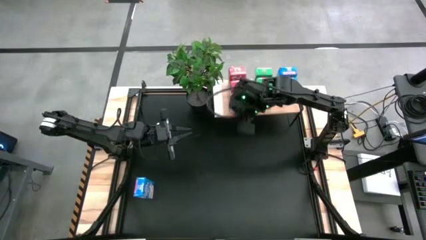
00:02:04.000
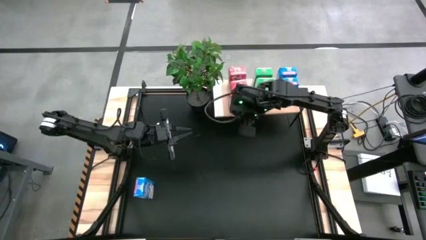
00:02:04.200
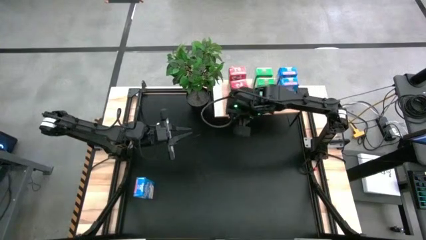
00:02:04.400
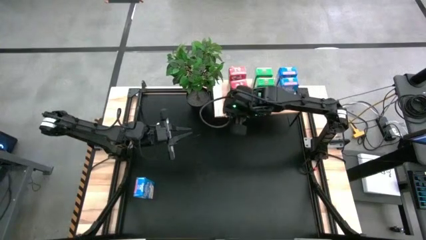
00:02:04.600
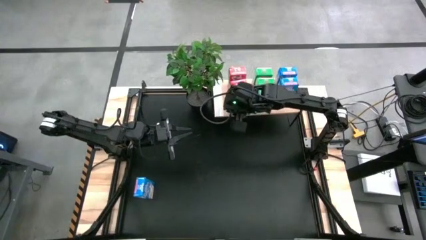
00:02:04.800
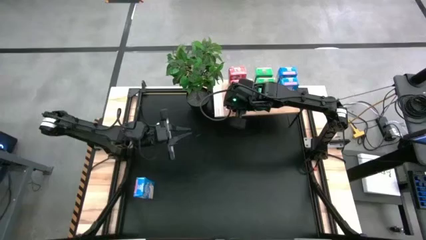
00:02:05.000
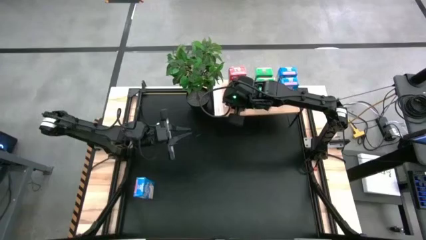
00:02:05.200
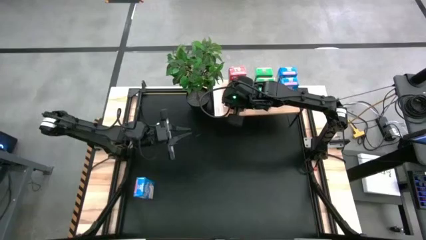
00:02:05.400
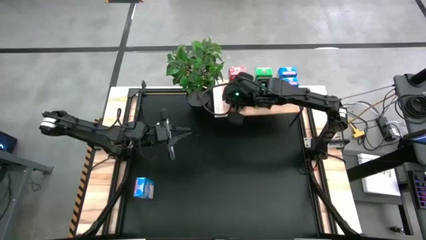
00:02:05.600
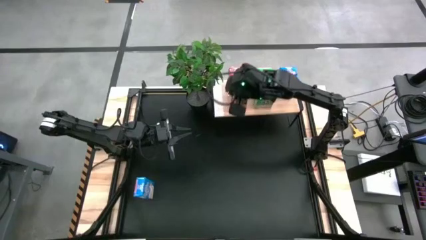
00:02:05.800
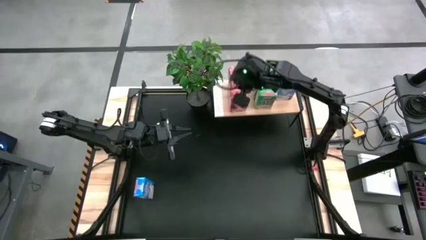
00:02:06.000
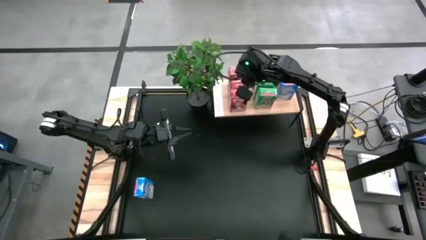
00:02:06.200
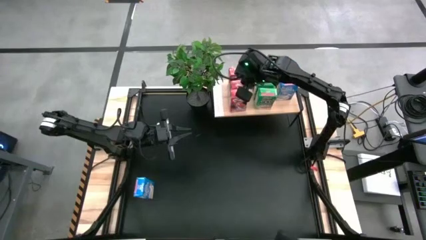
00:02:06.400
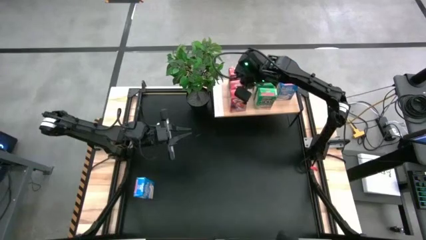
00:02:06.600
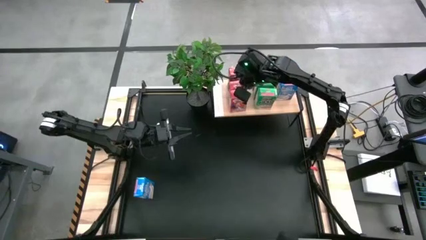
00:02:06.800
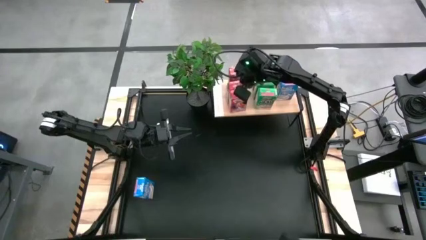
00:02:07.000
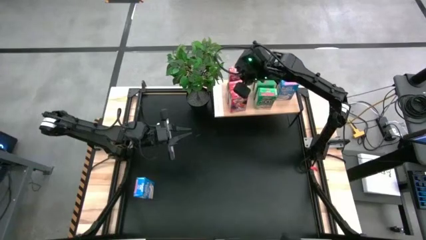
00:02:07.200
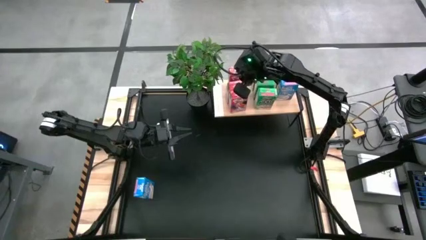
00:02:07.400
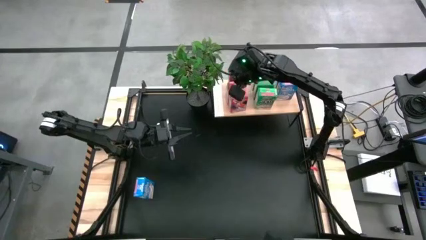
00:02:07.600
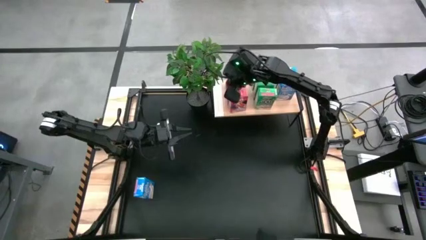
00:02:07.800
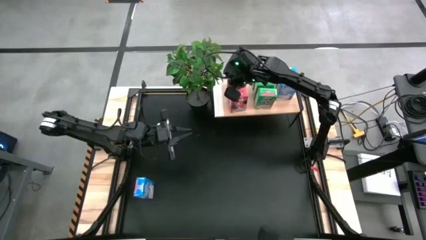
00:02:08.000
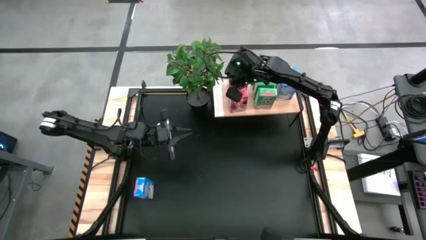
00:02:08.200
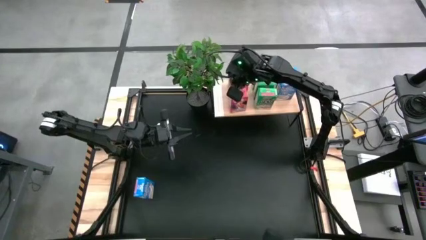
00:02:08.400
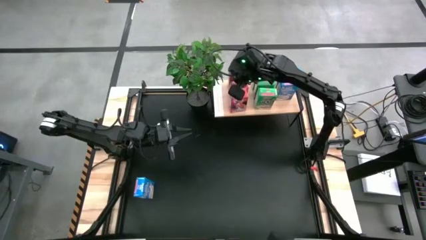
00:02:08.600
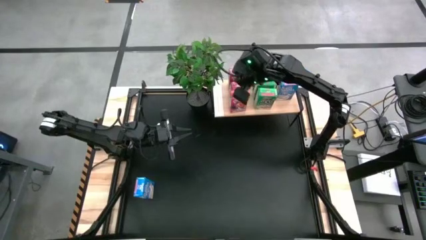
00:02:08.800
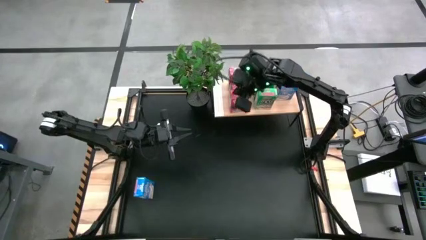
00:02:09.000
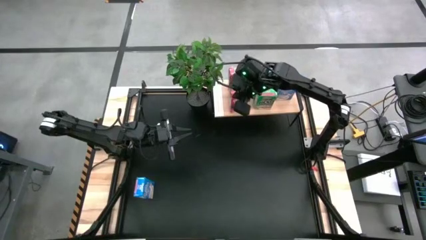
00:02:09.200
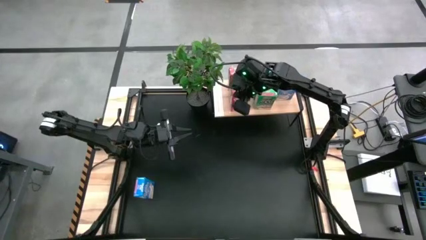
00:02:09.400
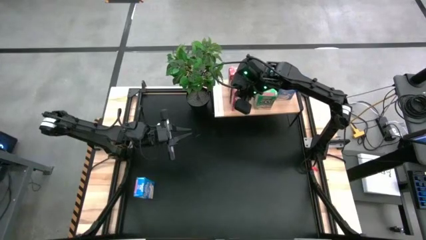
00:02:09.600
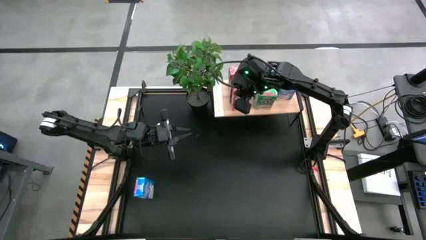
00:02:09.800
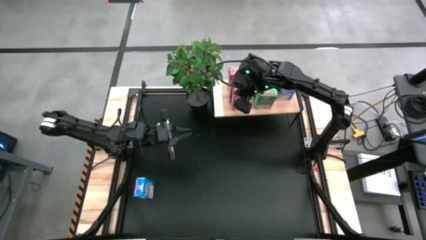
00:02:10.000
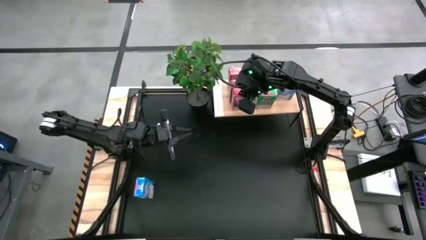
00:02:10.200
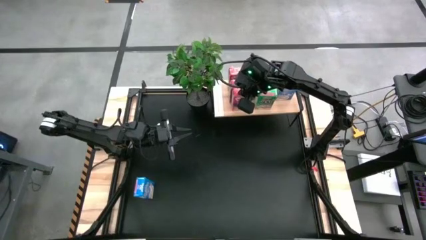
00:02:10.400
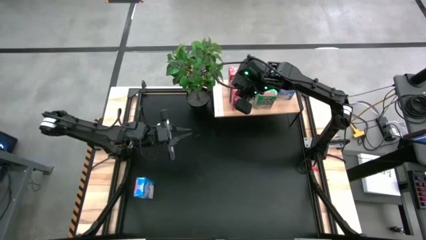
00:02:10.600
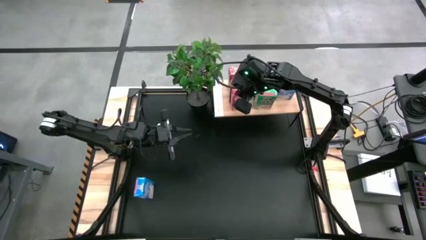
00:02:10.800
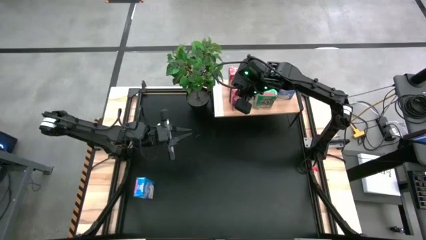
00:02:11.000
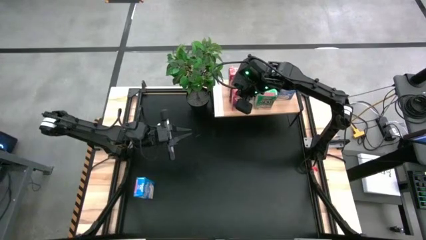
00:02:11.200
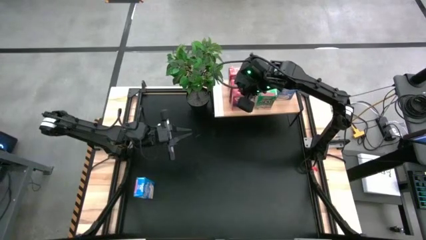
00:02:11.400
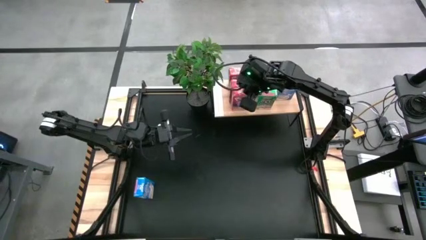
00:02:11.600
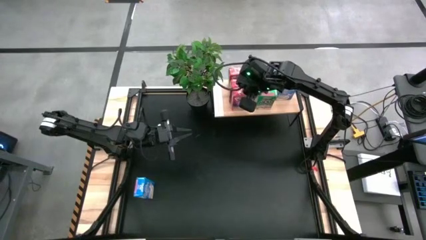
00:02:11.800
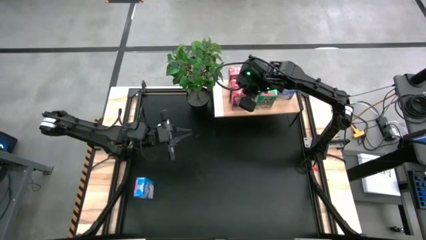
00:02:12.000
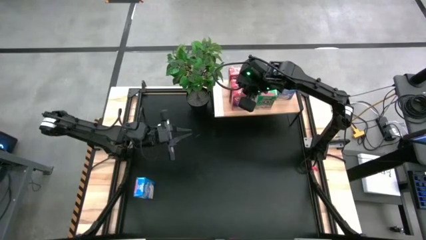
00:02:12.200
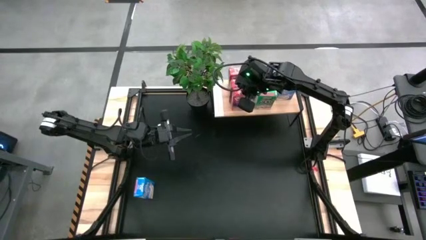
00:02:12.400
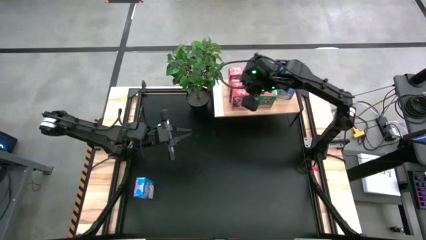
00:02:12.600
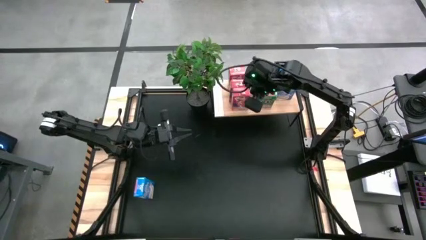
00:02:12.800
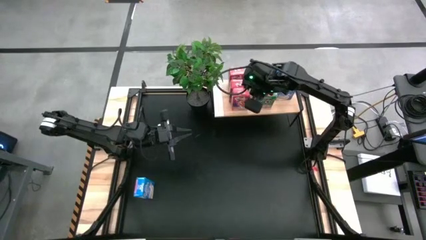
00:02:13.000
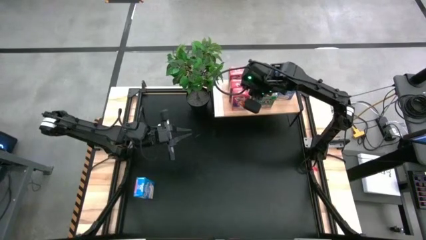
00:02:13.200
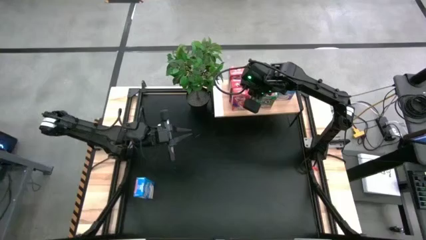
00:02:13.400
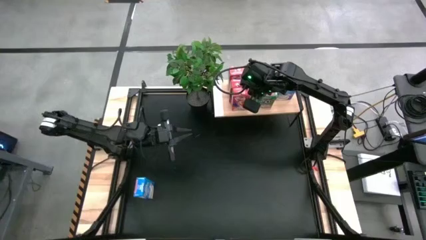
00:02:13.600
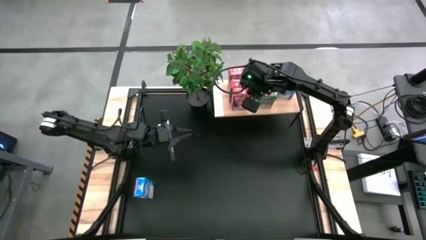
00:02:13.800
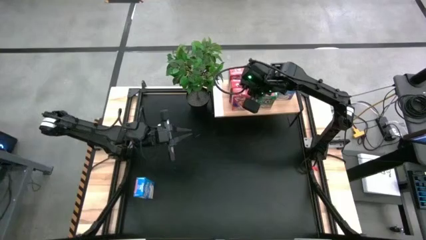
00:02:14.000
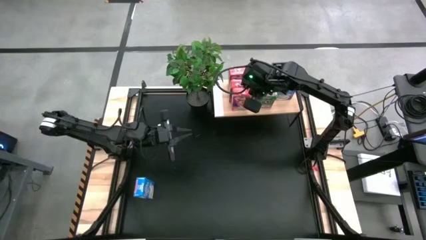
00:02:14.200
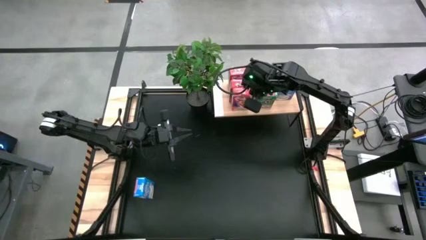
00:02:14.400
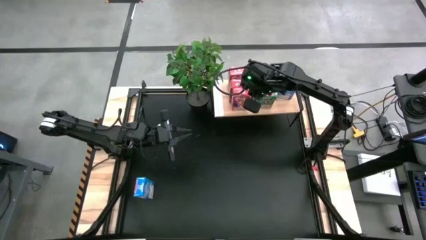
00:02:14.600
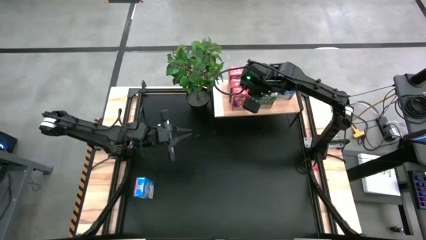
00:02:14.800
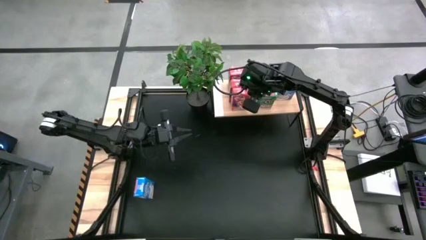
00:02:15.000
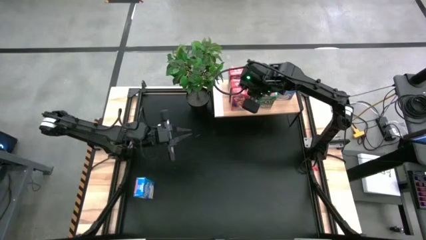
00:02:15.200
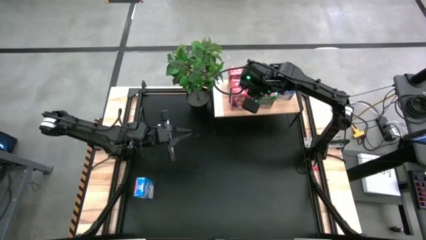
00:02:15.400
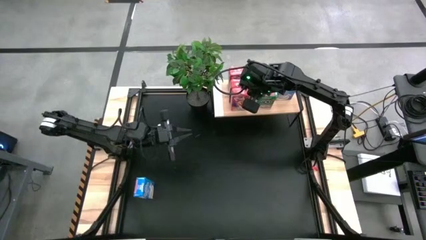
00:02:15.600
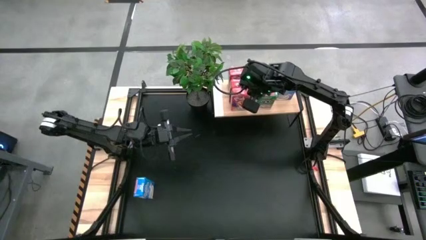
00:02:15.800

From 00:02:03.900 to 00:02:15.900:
Task: Stack cereal on shelf
Put the red cereal box on the shelf
